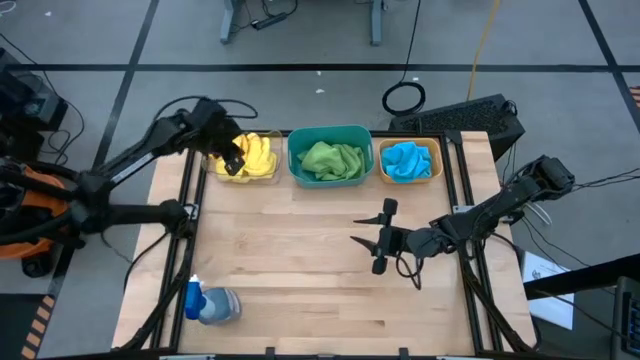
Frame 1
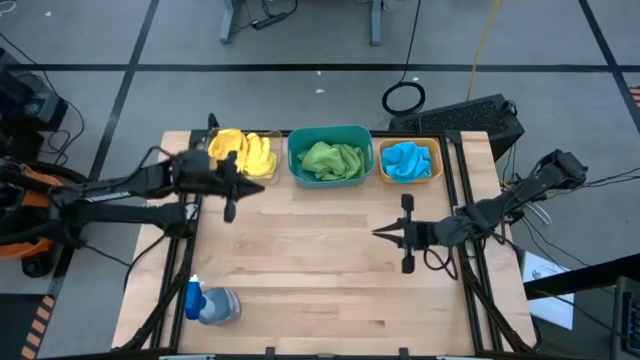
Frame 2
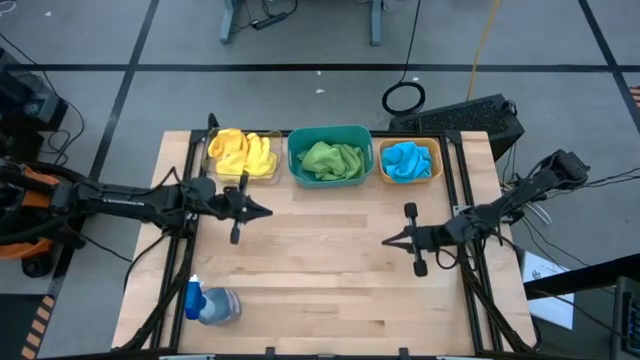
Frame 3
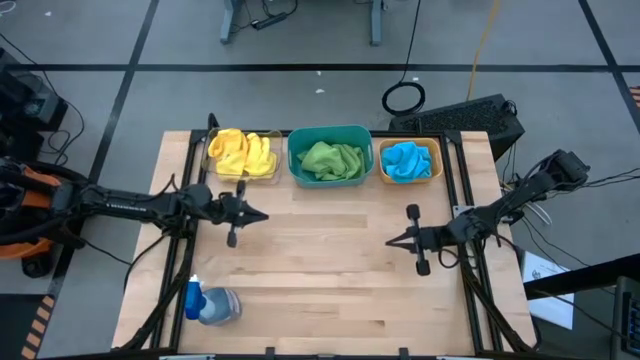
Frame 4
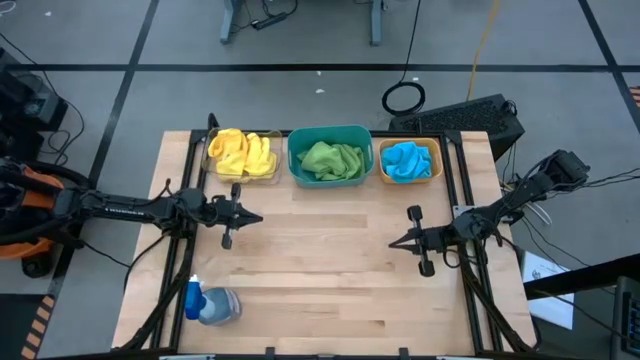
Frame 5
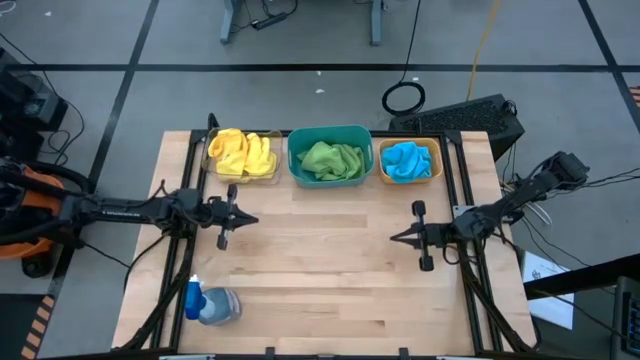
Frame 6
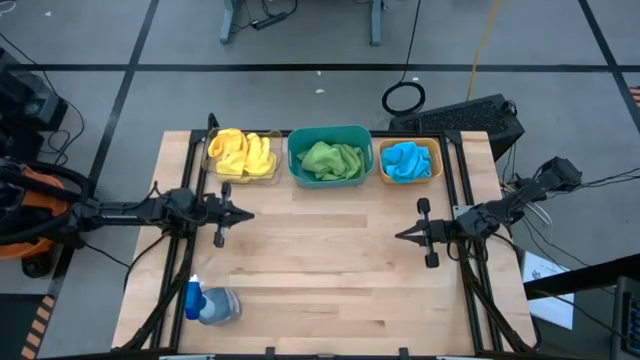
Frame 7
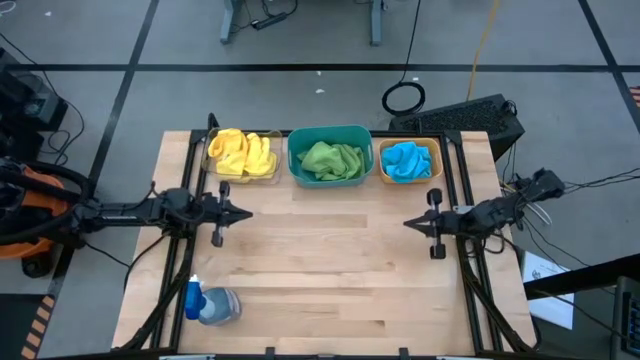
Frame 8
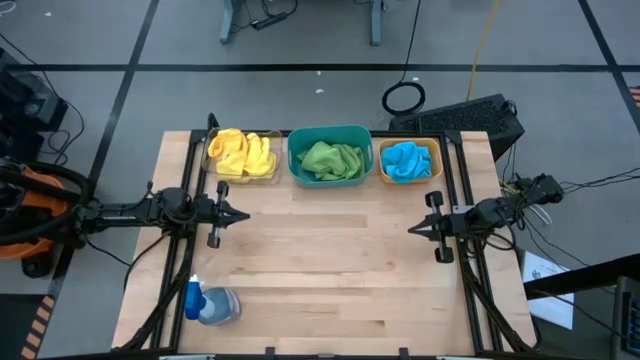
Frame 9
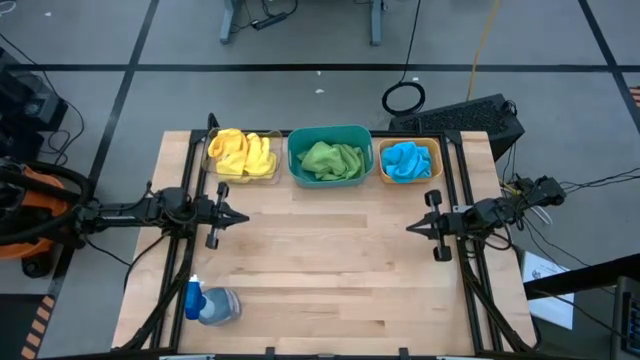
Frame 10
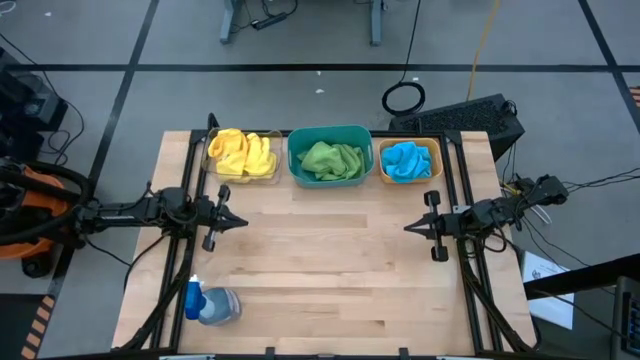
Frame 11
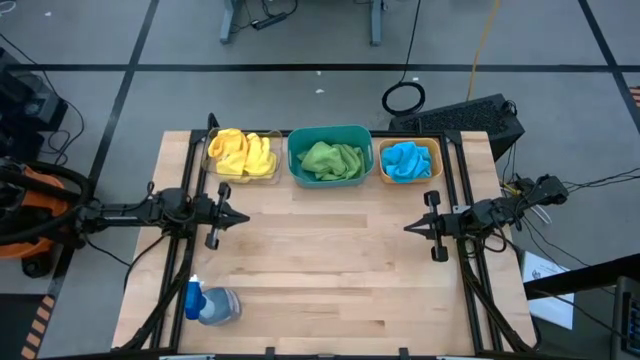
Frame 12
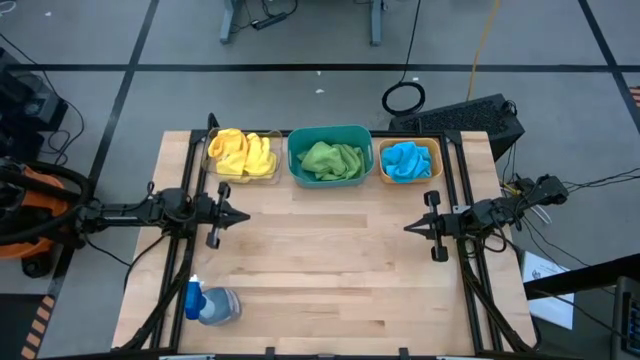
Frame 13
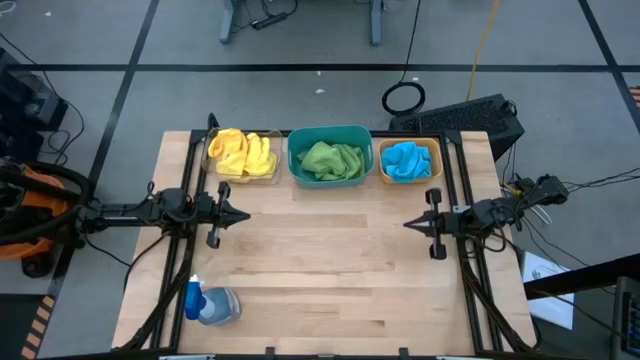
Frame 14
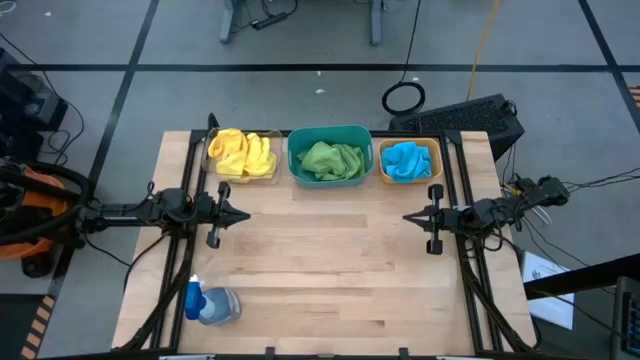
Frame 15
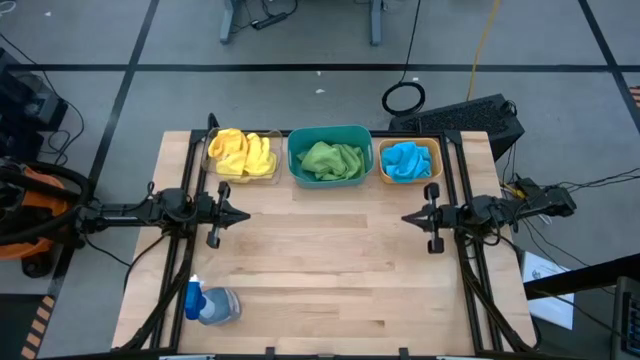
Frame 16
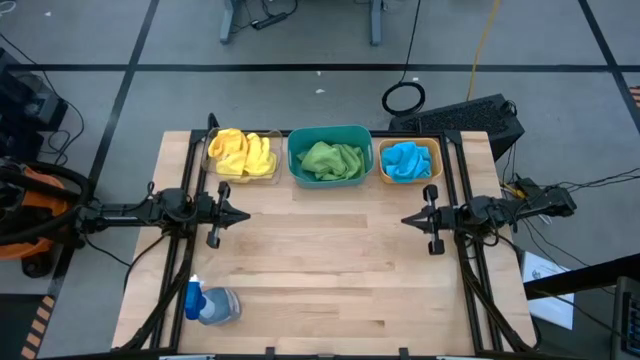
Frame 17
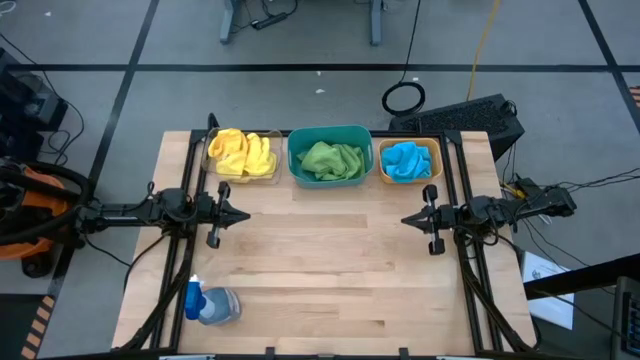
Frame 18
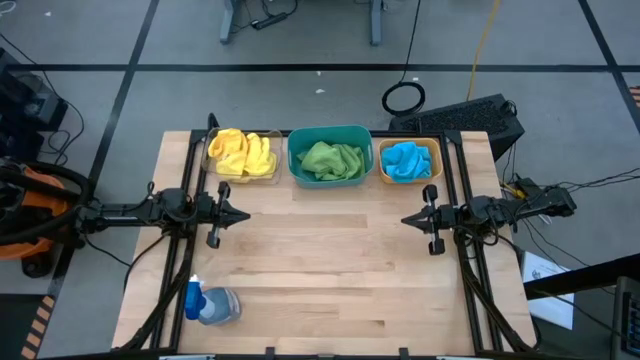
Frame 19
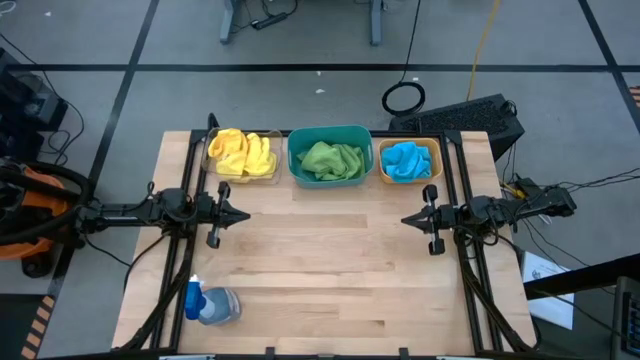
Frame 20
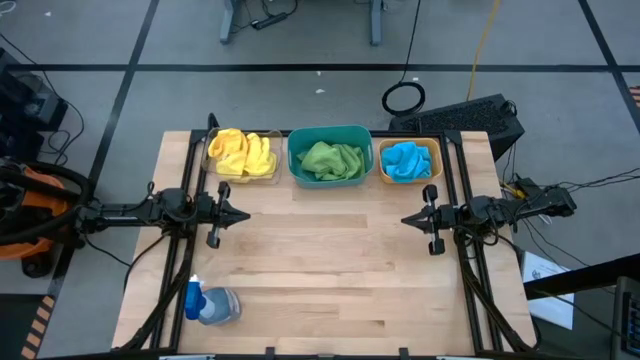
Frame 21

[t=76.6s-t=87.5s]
Task: Sort microfiber towel by color & place in baskets
Return to Home Position

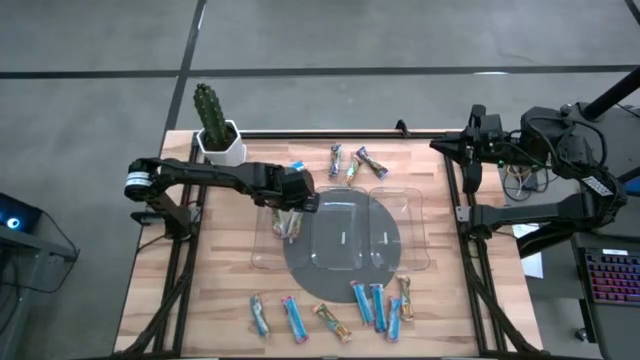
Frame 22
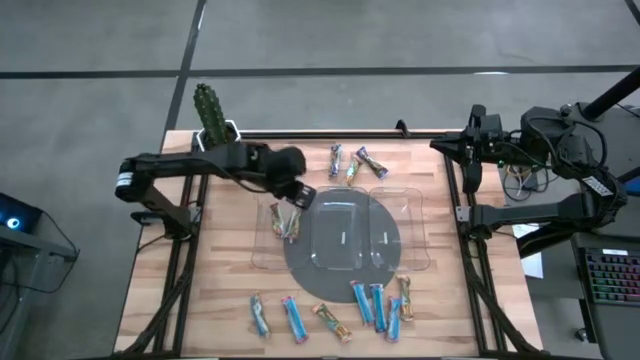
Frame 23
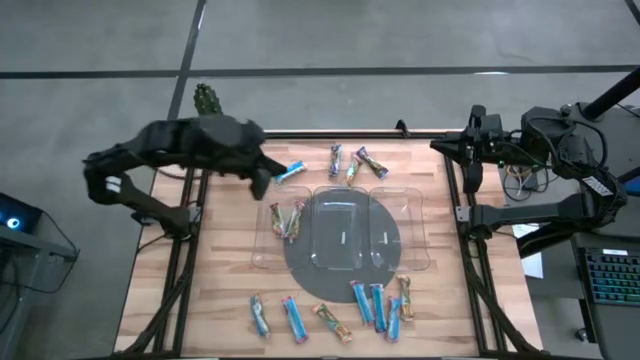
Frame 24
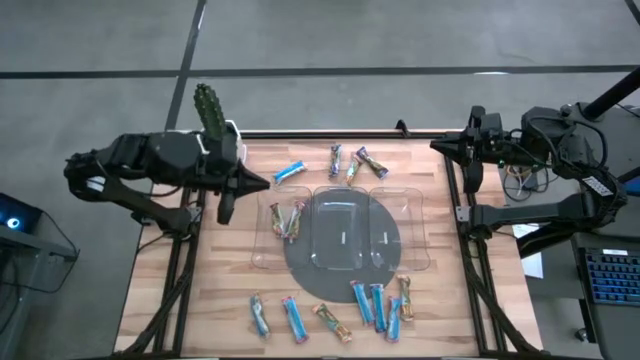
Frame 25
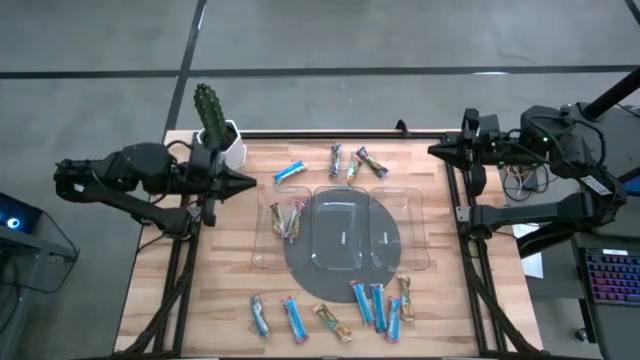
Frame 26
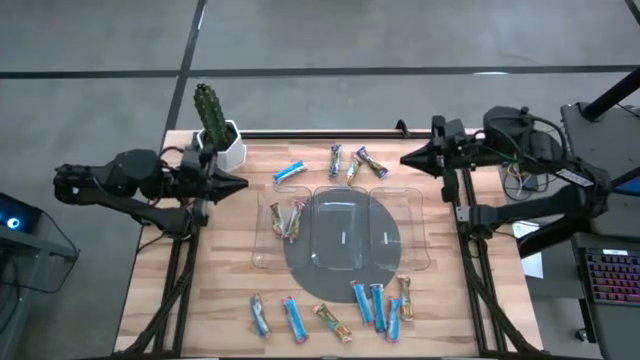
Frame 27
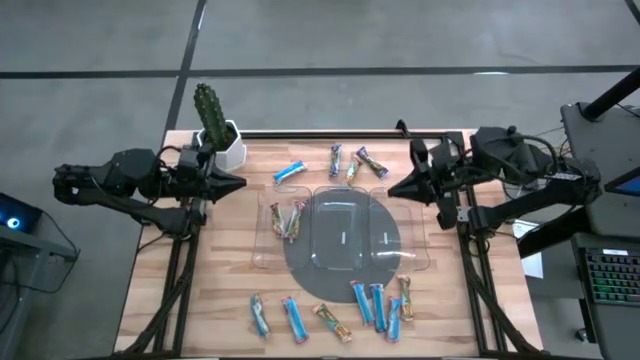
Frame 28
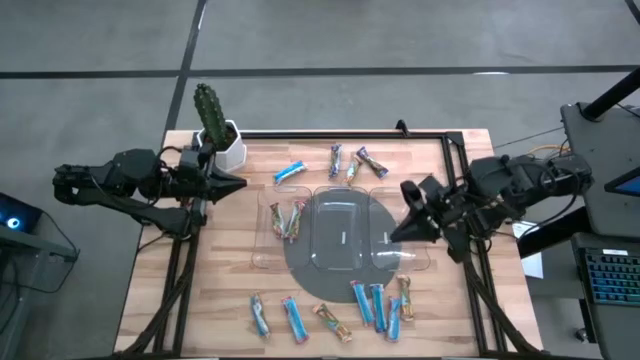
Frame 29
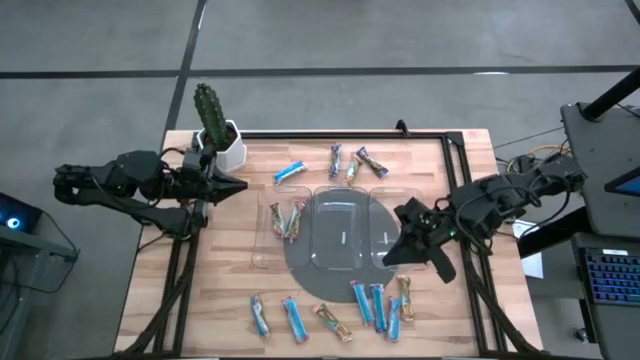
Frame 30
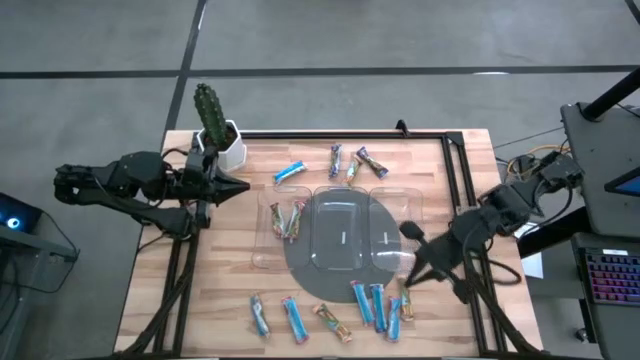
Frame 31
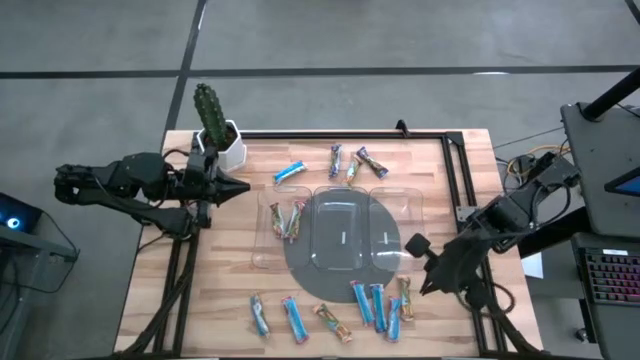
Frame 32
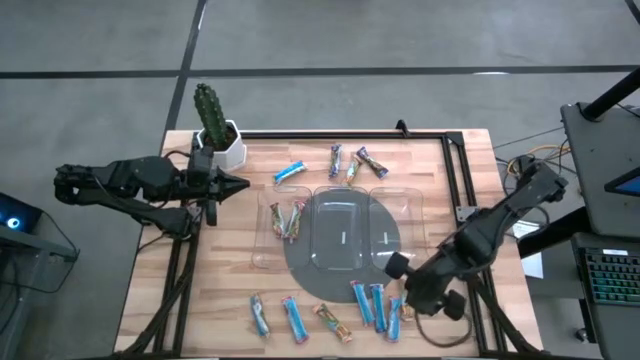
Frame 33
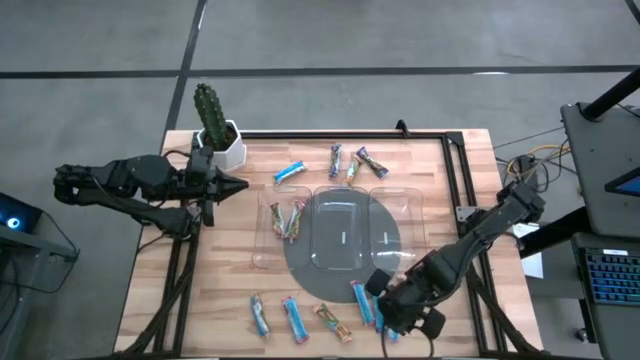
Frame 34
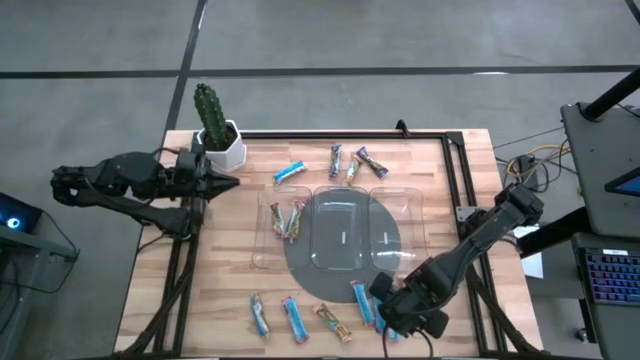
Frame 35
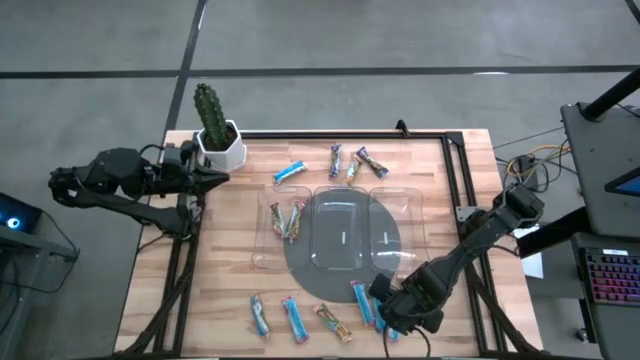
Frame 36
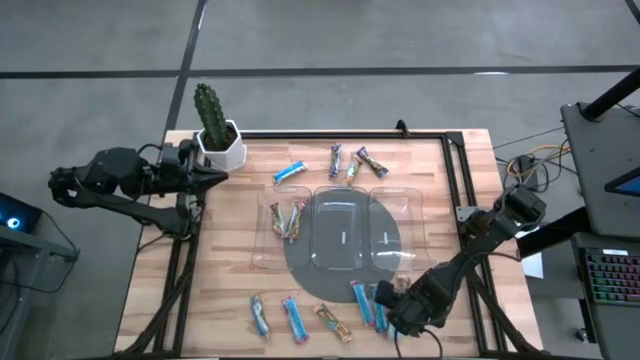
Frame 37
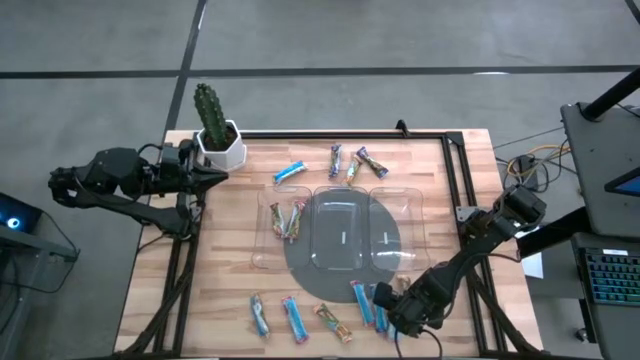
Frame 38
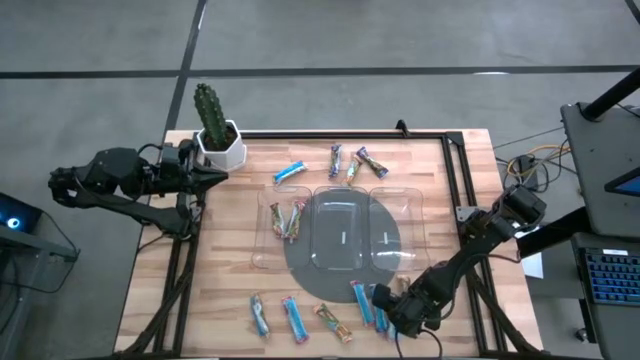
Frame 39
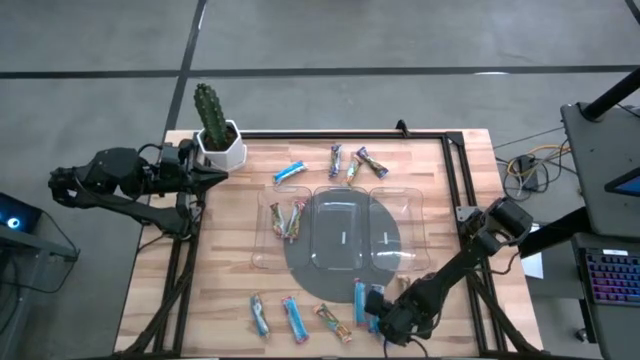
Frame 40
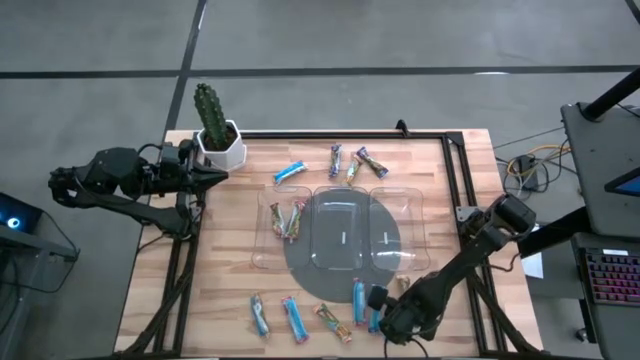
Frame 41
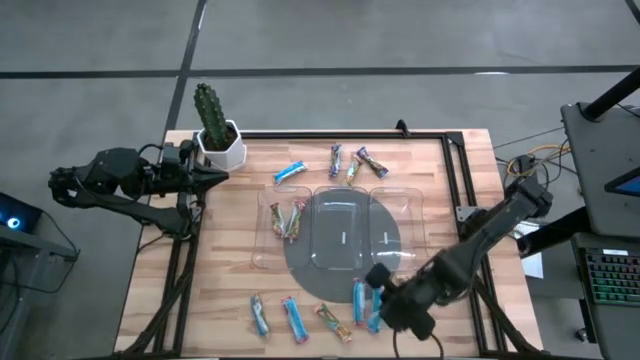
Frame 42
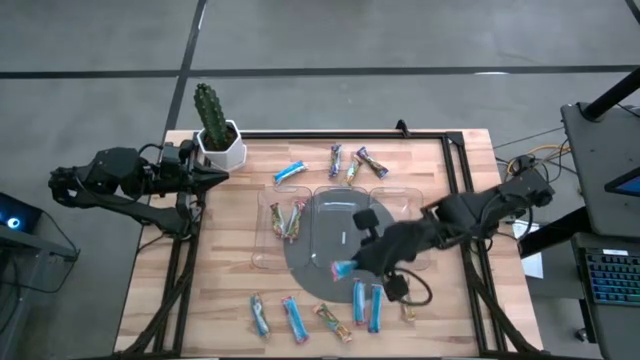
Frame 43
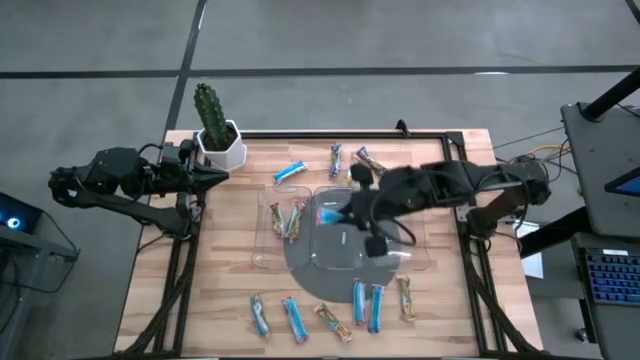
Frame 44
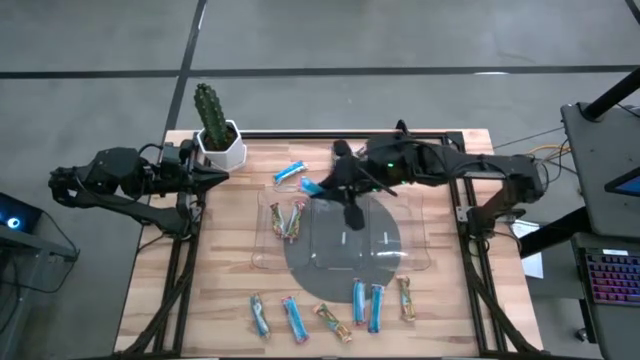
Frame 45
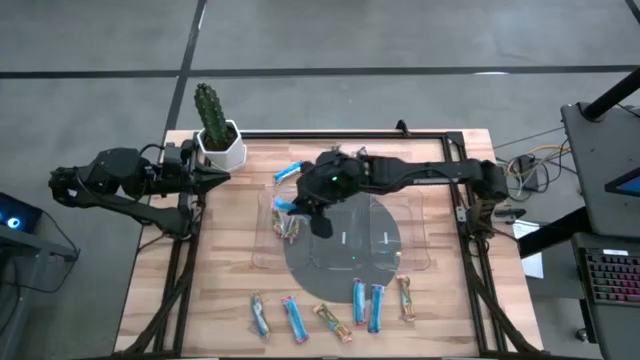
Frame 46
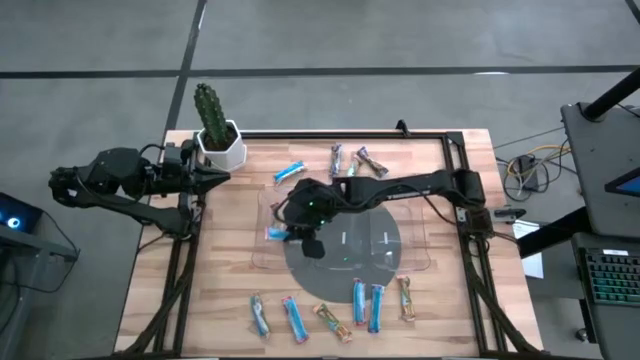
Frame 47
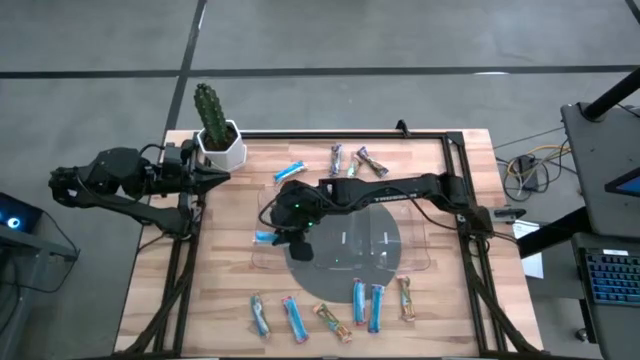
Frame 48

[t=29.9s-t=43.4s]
Task: Pick and place Granola Bars by type
Put the red granola bar into the left transparent bin
